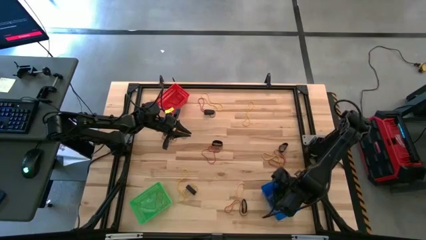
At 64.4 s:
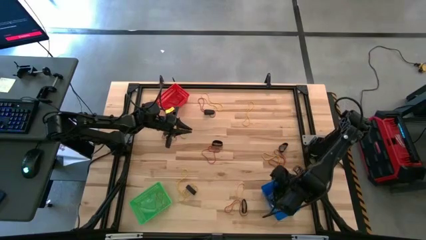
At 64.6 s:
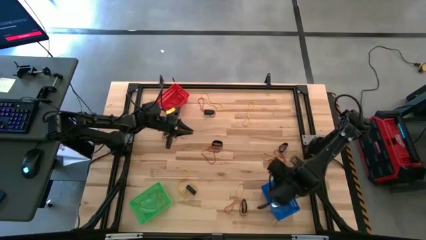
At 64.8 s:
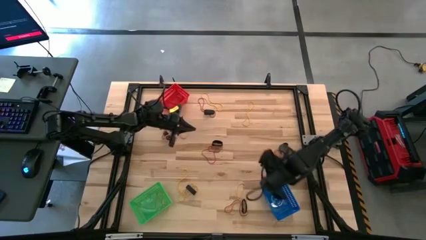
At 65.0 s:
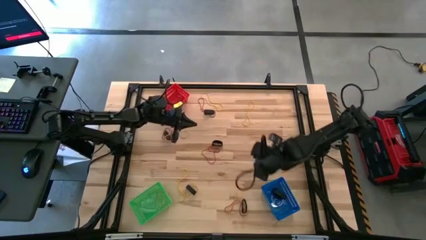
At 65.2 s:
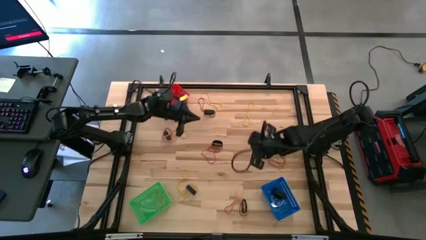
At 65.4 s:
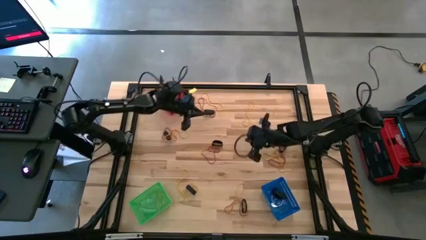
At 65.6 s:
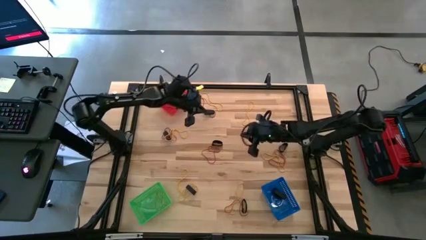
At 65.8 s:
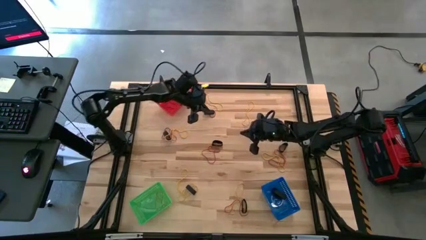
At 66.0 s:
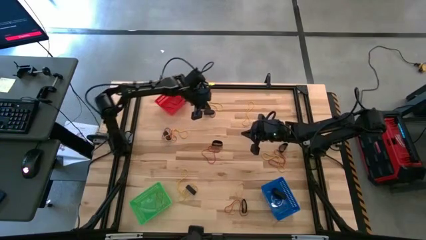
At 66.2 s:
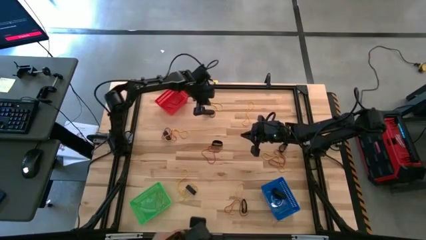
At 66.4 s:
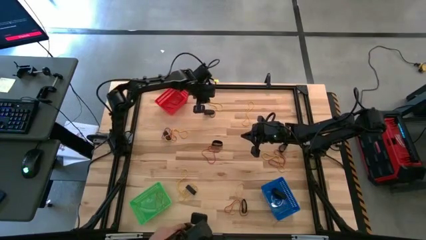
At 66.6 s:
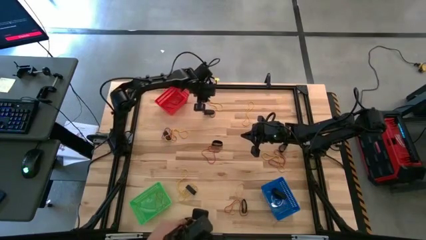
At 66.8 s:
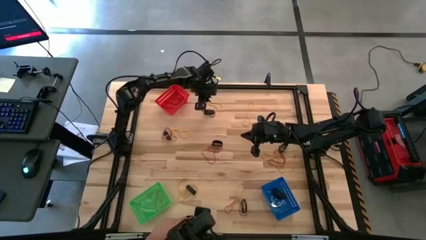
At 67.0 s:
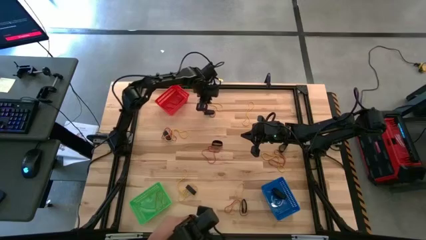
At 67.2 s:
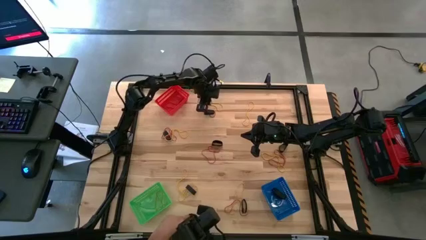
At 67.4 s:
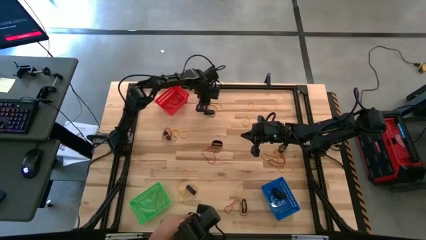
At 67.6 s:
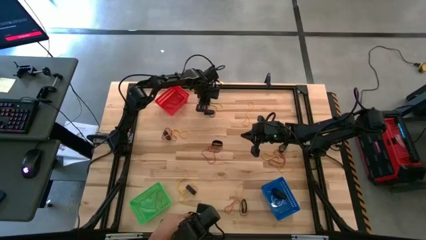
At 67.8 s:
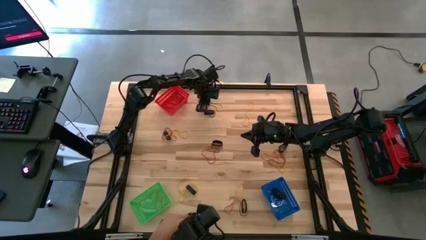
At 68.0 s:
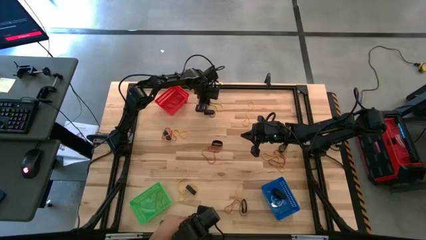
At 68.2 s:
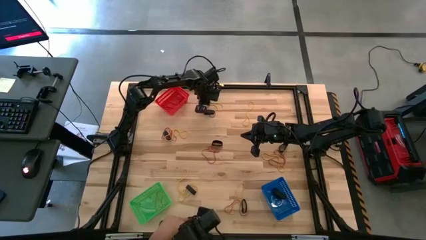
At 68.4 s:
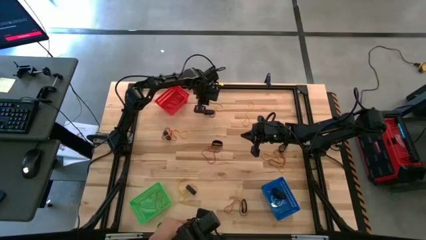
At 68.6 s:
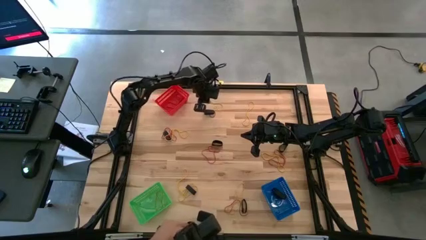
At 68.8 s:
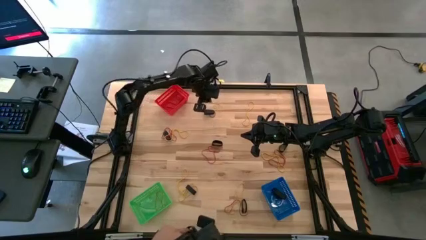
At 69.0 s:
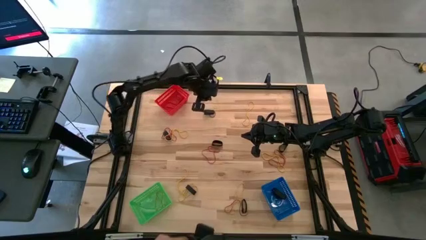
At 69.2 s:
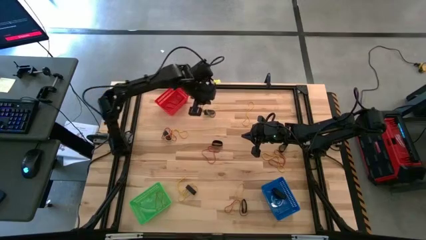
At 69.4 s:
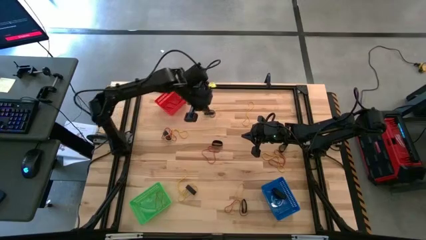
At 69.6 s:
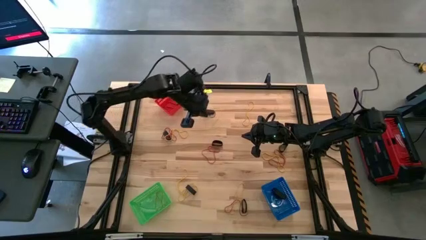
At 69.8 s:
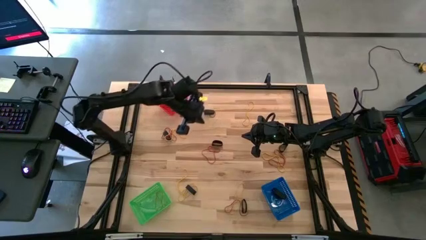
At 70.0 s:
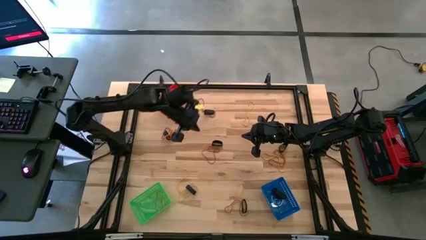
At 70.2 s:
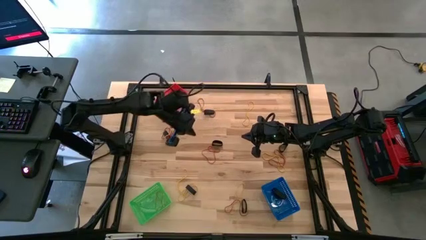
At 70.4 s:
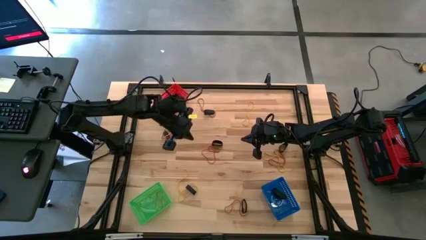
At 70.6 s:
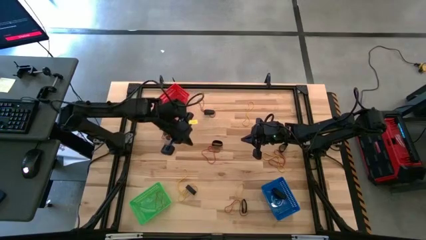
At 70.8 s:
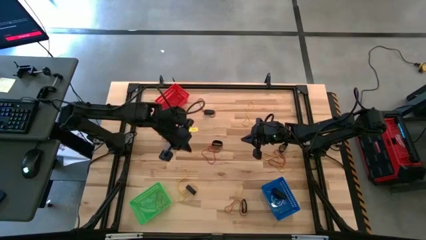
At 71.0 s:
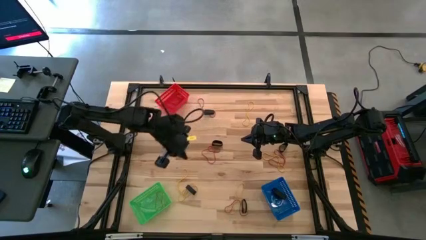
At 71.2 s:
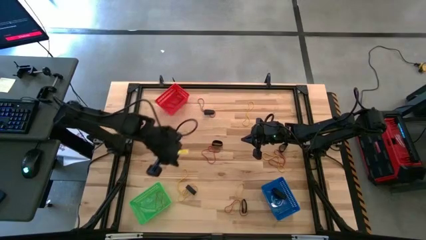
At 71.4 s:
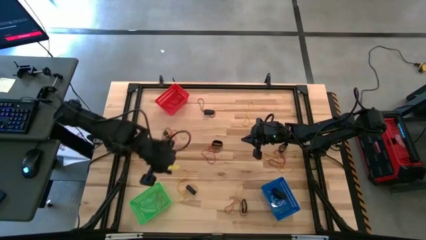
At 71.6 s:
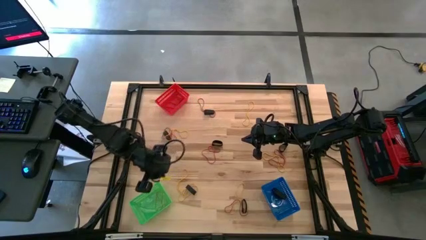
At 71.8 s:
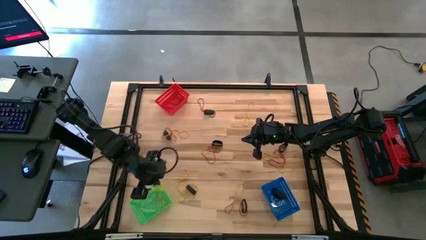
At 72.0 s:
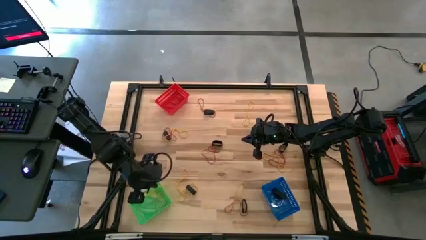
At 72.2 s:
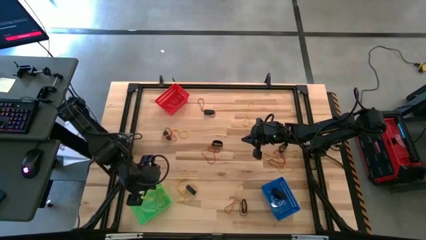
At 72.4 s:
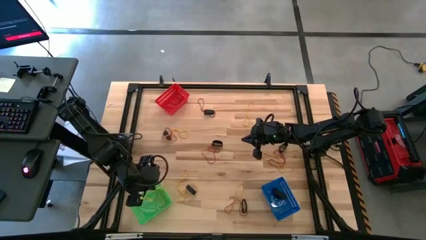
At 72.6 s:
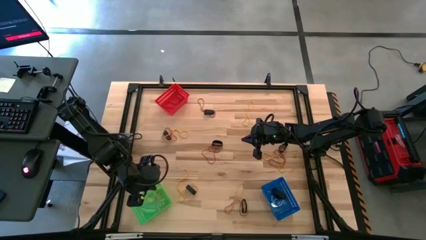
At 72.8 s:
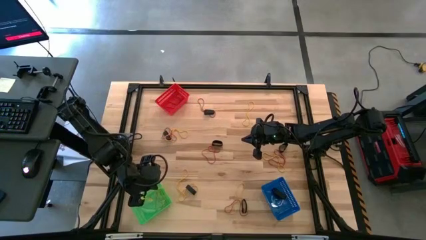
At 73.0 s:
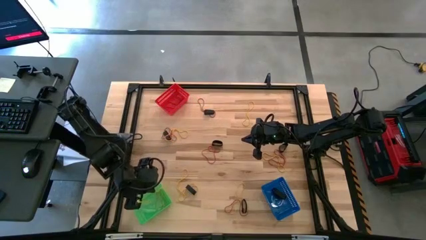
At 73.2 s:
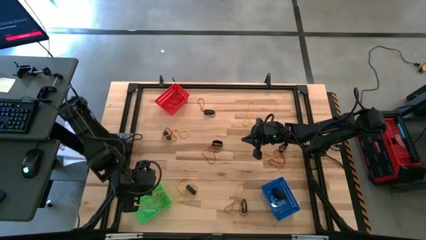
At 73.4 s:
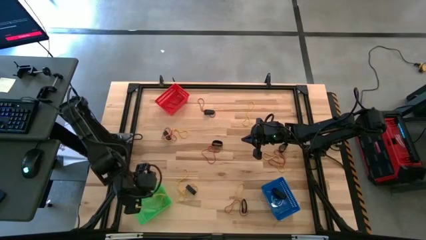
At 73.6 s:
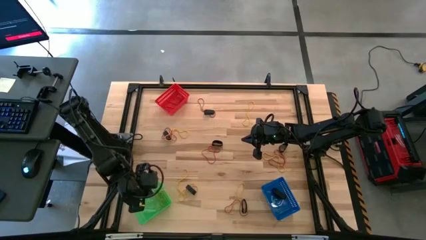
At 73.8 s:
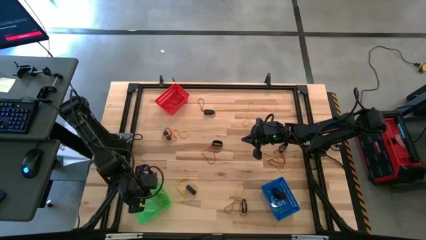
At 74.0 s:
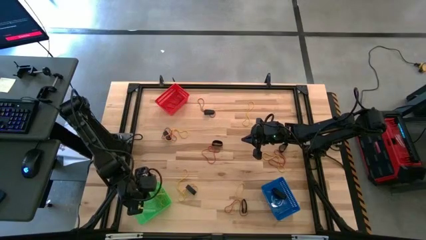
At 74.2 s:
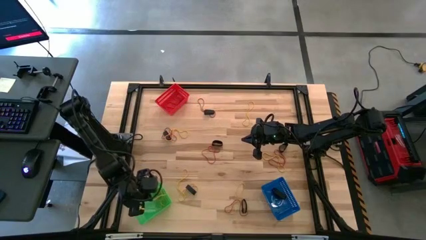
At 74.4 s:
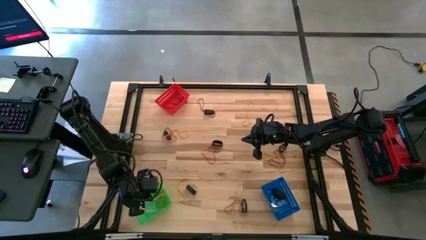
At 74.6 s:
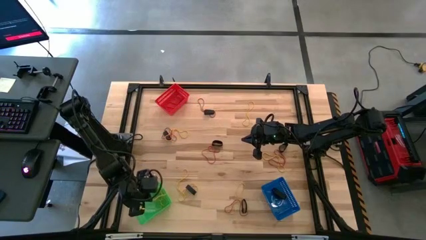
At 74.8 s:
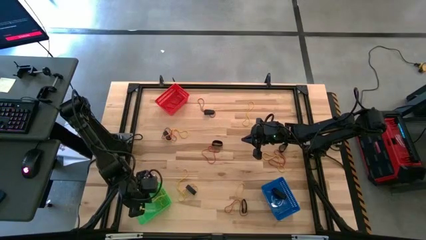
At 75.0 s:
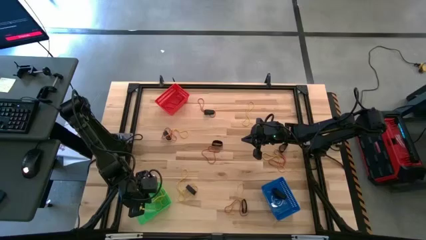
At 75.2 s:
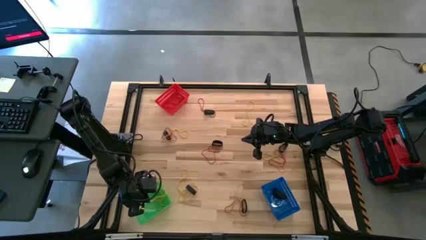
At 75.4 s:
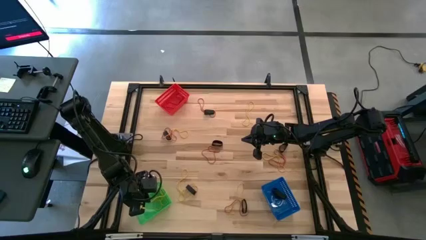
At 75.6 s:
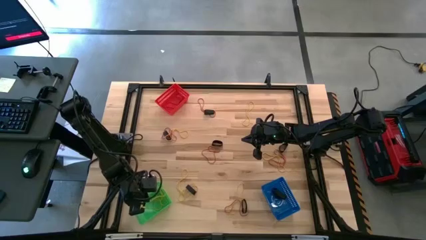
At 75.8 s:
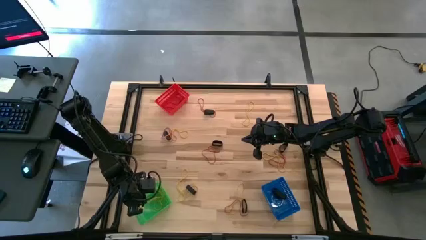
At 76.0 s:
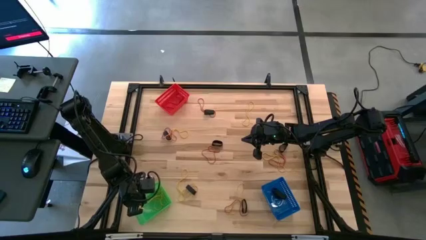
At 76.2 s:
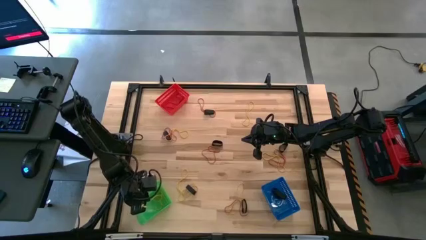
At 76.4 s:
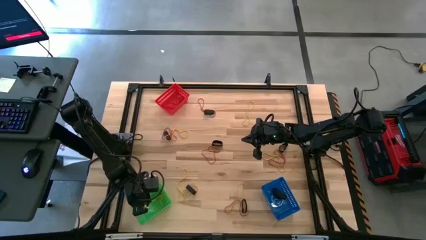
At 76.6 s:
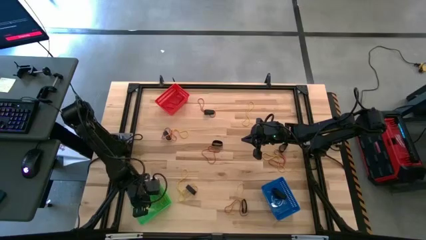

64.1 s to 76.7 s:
Task: Sort rubber bands into baskets
Put the yellow rubber band into the green basket

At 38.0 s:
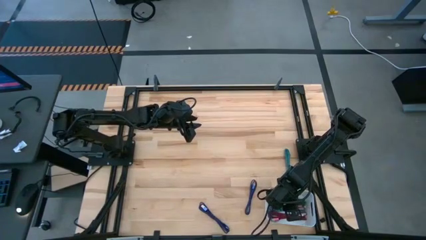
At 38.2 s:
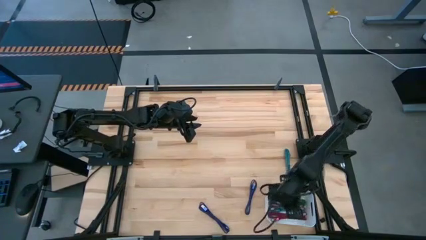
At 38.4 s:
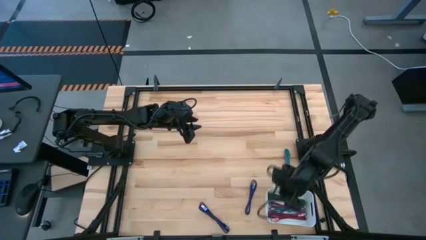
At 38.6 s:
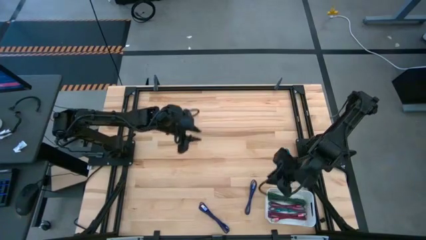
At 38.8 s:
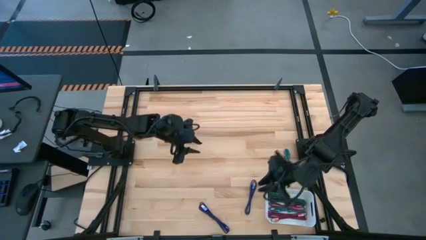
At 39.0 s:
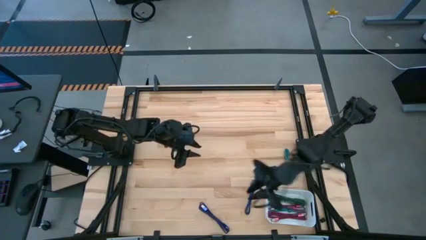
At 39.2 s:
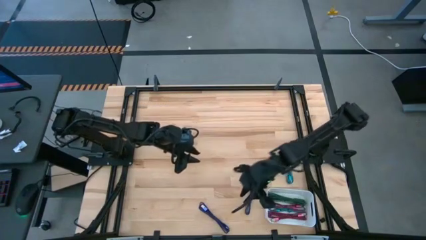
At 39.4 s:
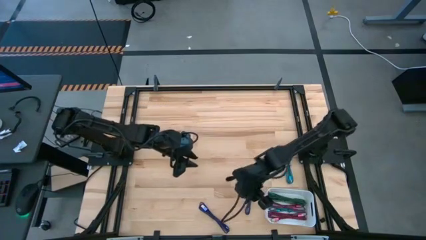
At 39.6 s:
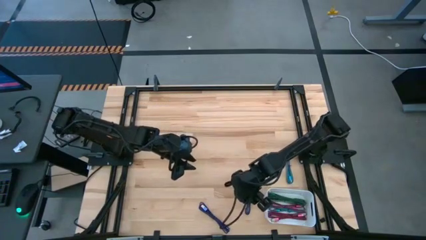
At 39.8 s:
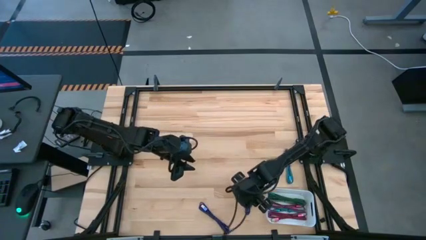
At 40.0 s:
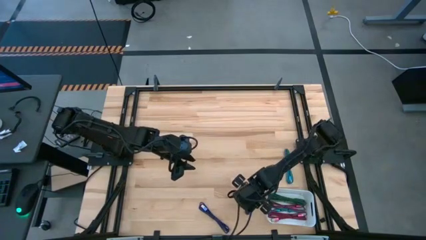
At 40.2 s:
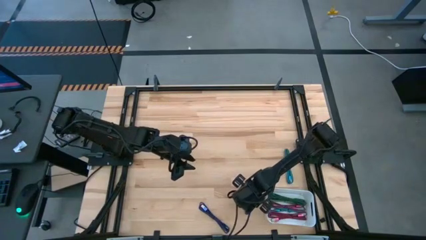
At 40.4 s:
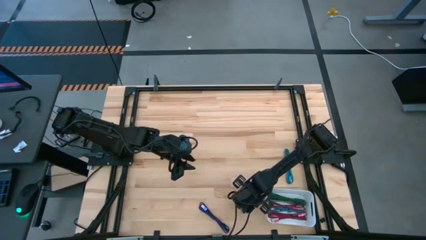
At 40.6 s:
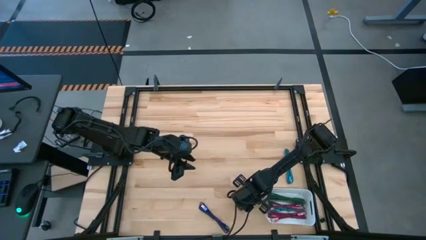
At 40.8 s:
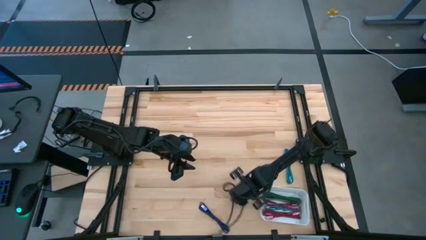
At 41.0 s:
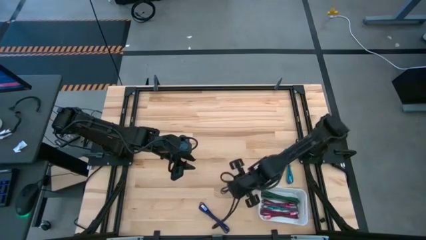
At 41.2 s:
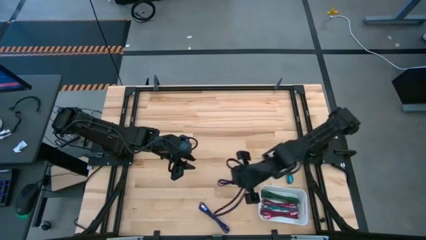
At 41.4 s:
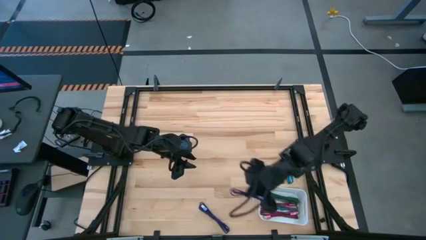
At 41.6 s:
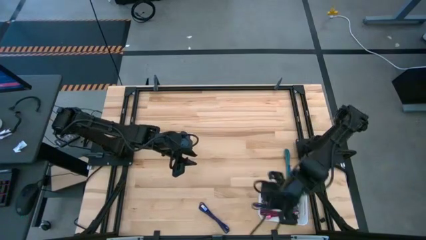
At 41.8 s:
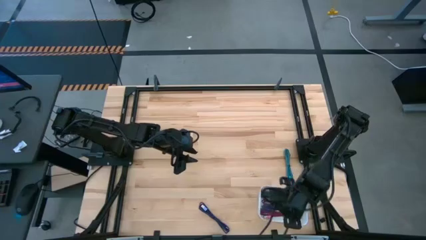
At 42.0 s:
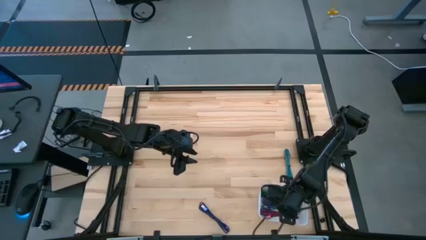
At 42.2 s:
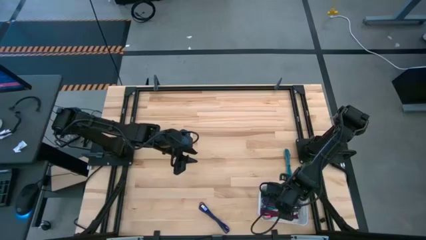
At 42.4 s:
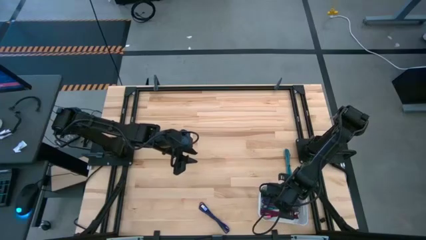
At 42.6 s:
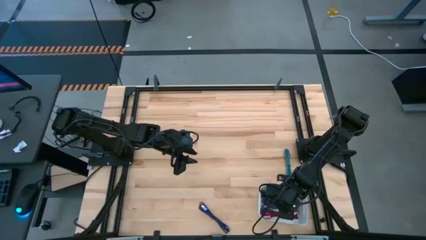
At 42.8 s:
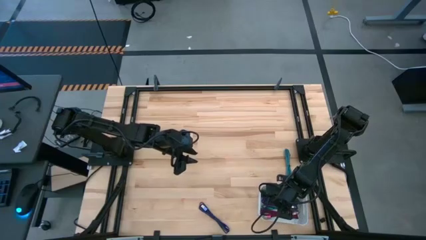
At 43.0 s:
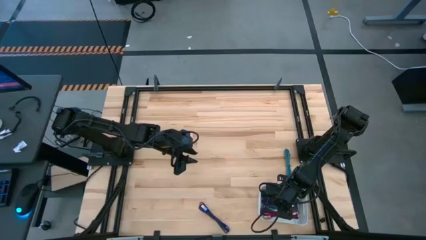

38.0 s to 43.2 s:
Task: Pick and place USB-C Cables
Put the right purple USB cable into the white bin
